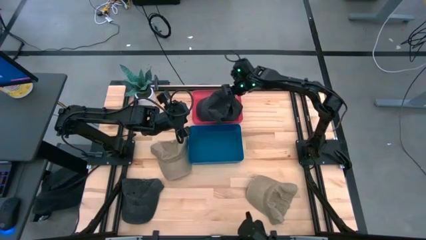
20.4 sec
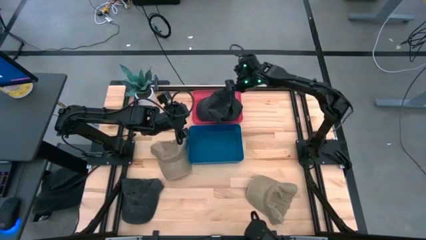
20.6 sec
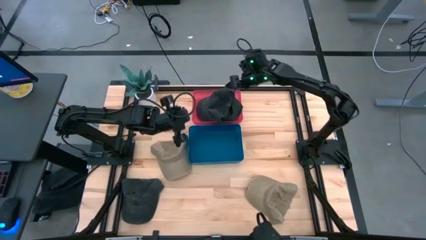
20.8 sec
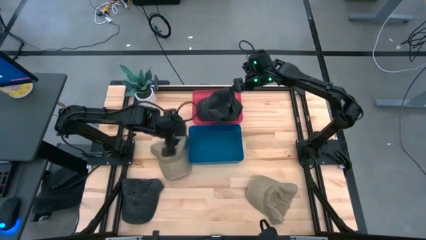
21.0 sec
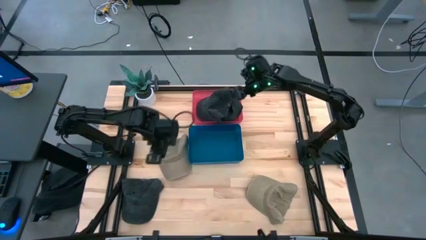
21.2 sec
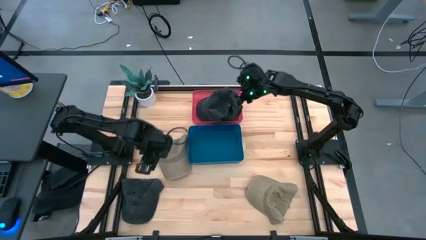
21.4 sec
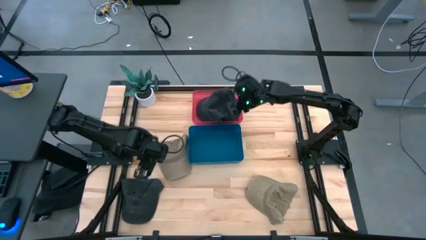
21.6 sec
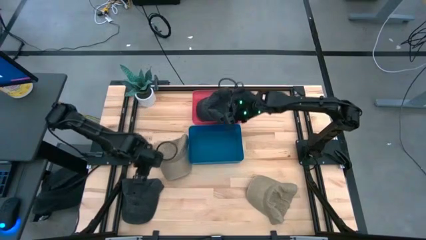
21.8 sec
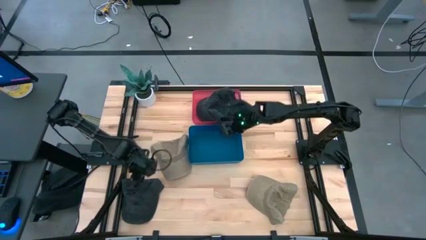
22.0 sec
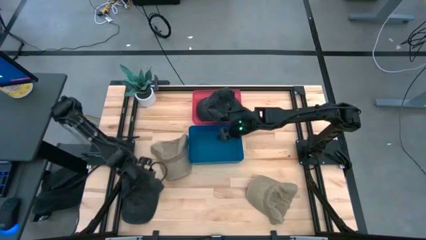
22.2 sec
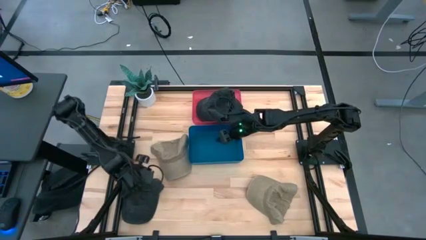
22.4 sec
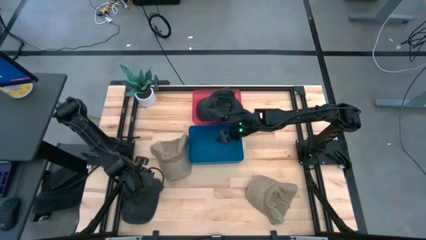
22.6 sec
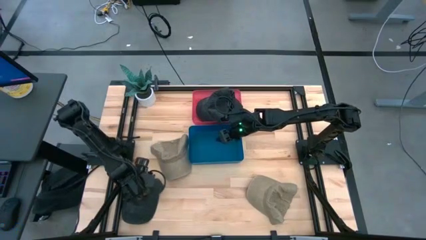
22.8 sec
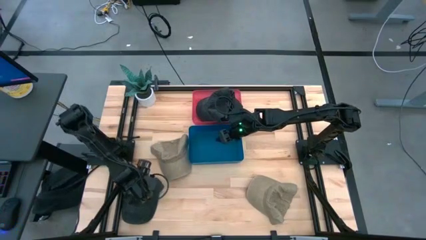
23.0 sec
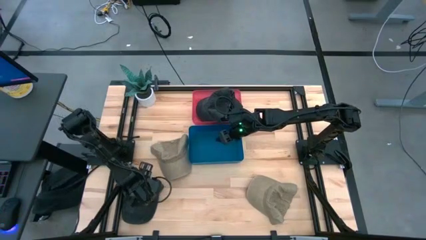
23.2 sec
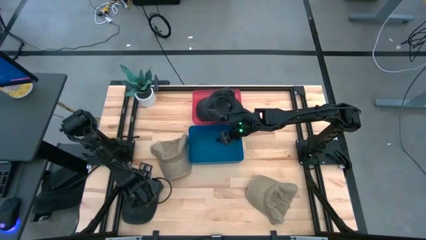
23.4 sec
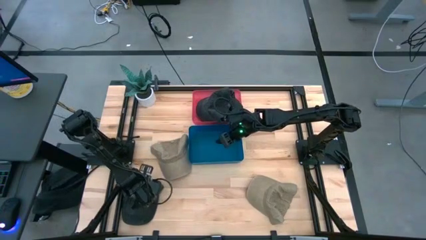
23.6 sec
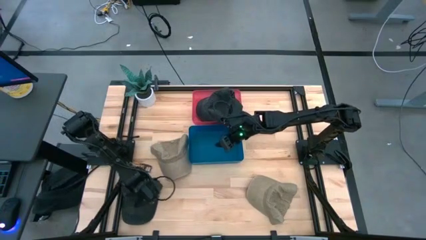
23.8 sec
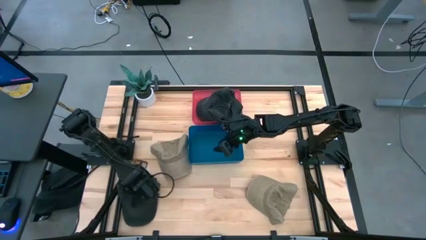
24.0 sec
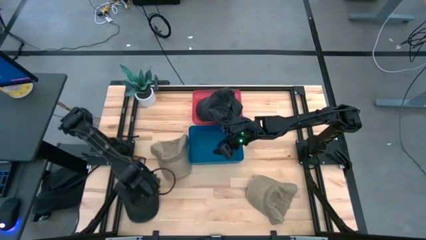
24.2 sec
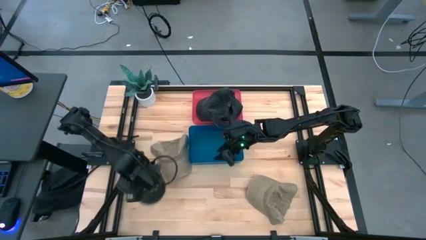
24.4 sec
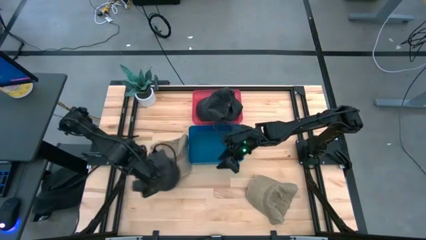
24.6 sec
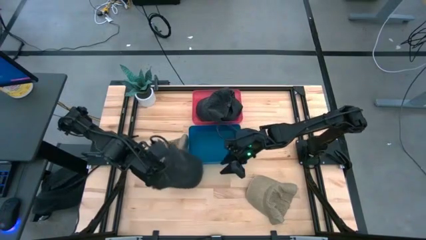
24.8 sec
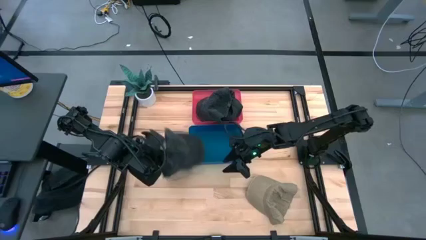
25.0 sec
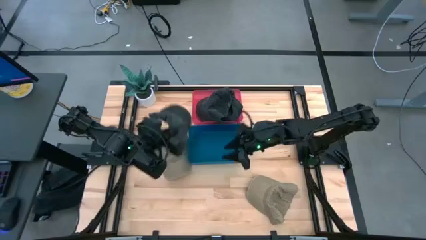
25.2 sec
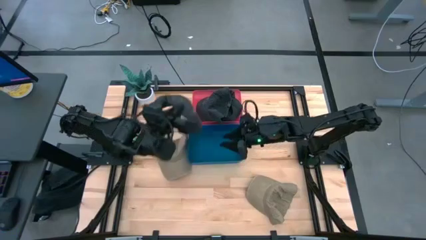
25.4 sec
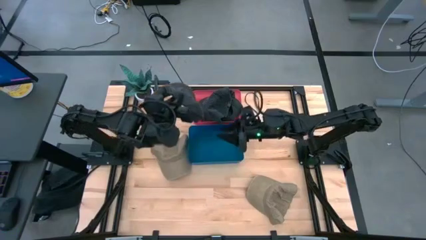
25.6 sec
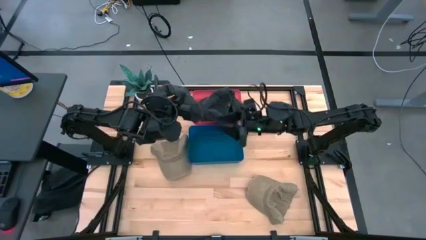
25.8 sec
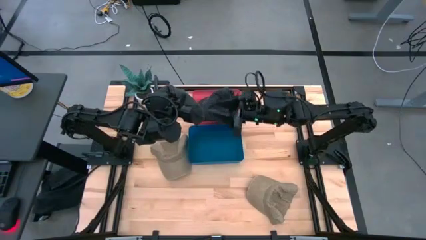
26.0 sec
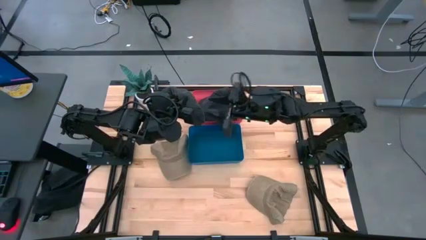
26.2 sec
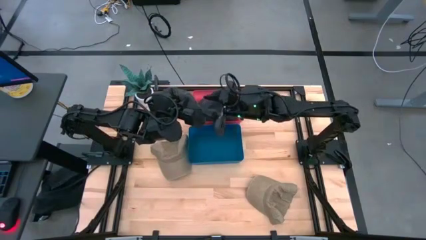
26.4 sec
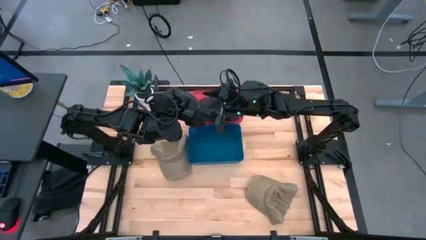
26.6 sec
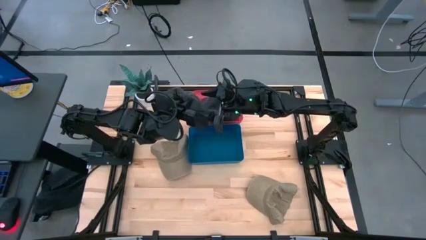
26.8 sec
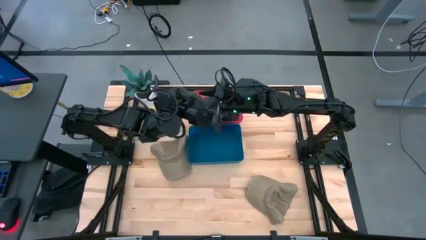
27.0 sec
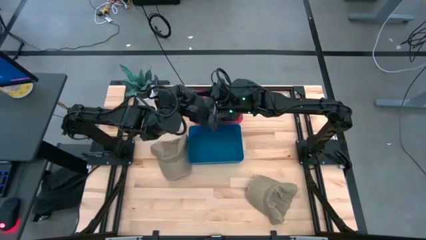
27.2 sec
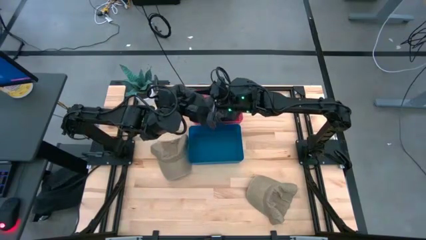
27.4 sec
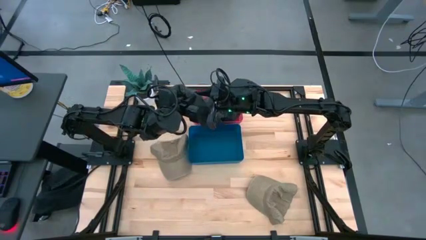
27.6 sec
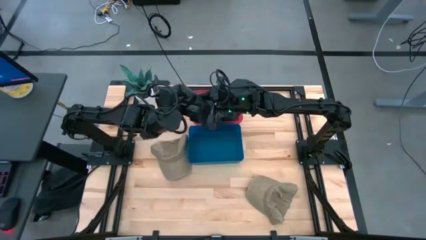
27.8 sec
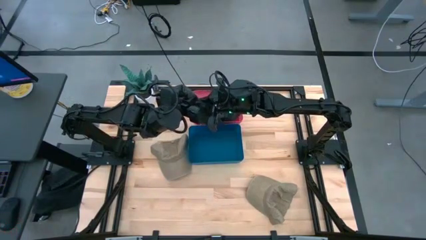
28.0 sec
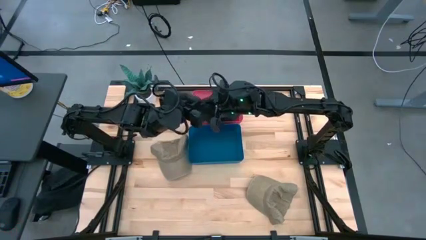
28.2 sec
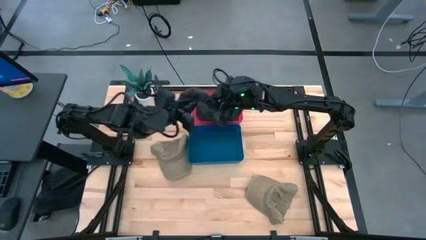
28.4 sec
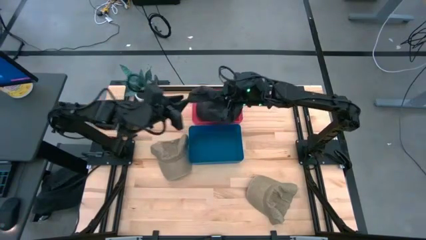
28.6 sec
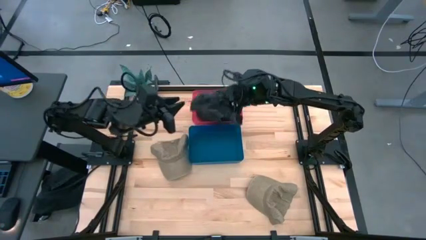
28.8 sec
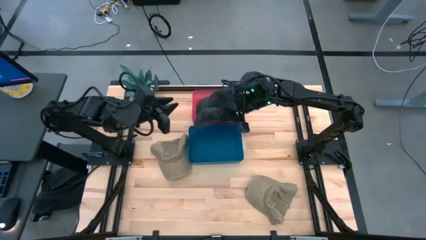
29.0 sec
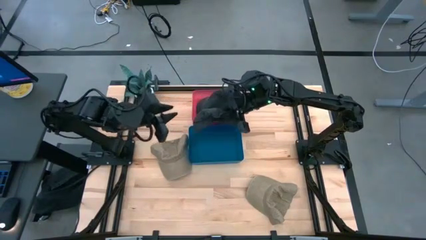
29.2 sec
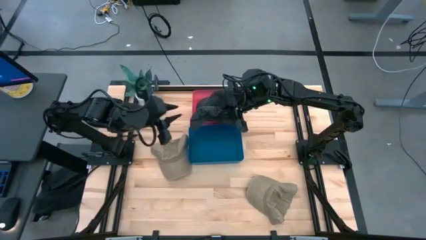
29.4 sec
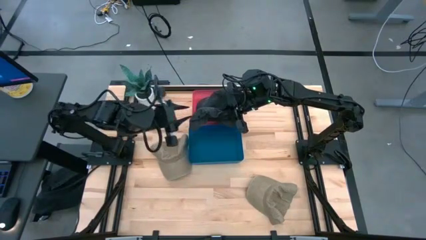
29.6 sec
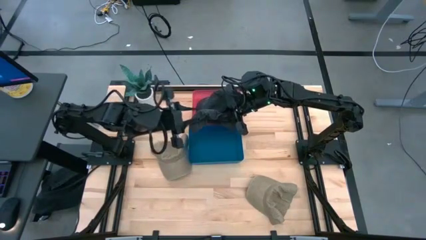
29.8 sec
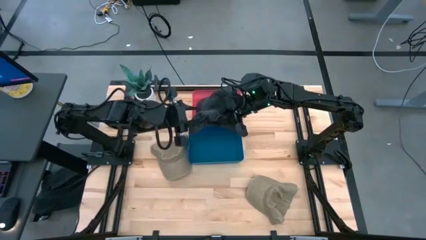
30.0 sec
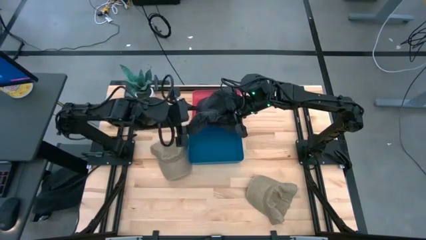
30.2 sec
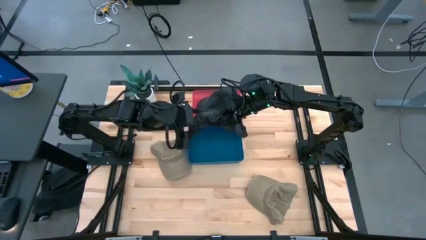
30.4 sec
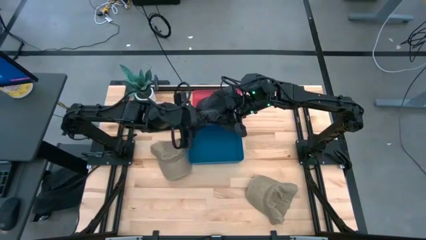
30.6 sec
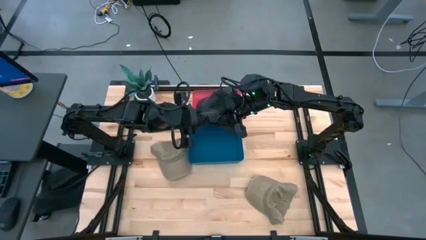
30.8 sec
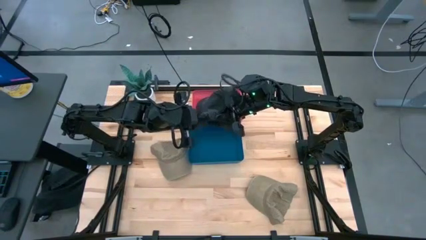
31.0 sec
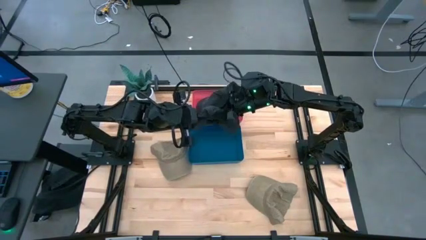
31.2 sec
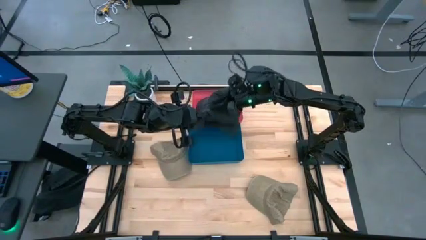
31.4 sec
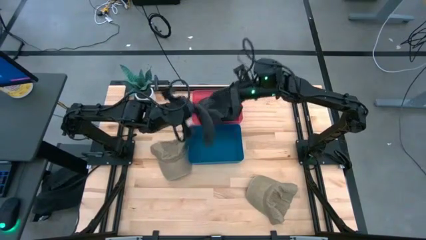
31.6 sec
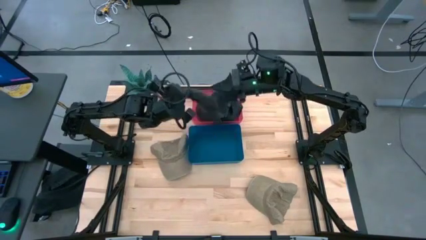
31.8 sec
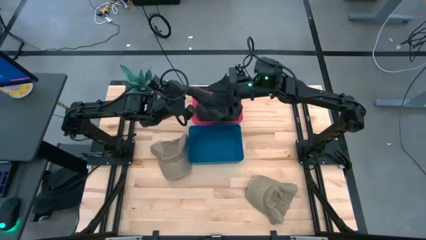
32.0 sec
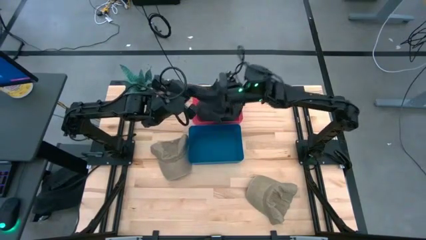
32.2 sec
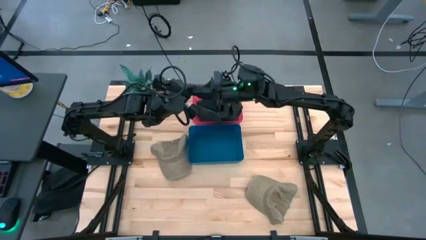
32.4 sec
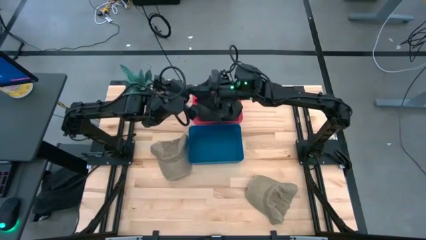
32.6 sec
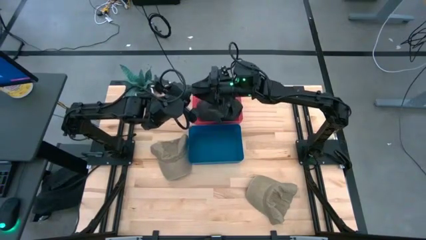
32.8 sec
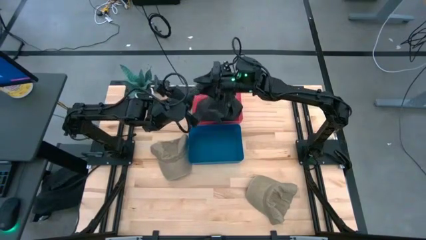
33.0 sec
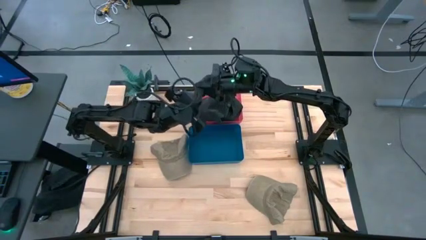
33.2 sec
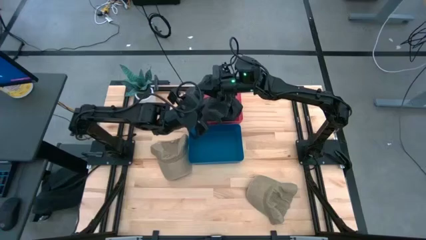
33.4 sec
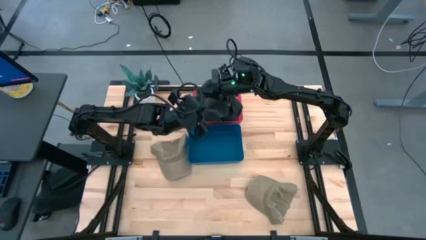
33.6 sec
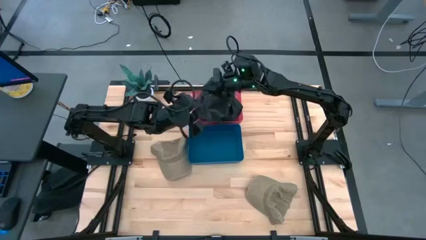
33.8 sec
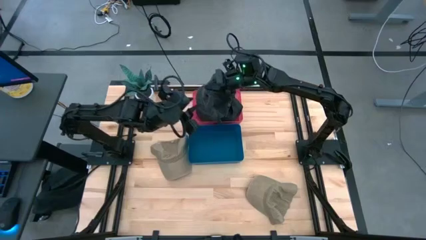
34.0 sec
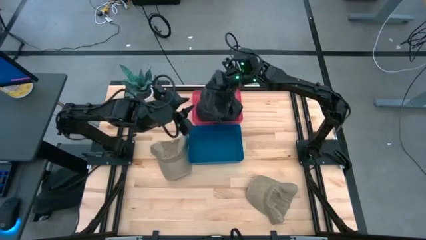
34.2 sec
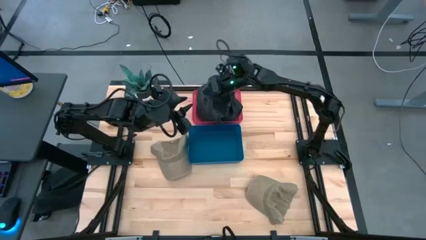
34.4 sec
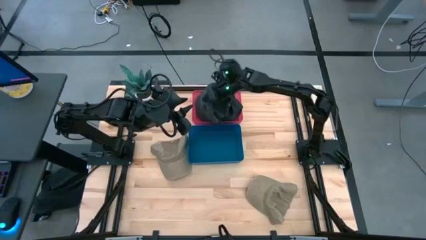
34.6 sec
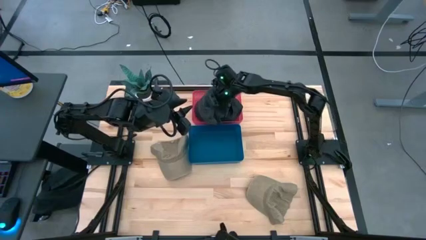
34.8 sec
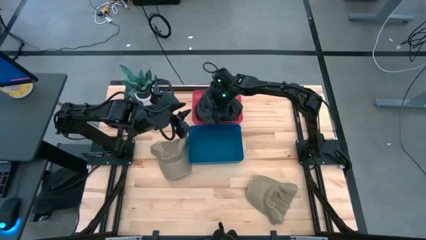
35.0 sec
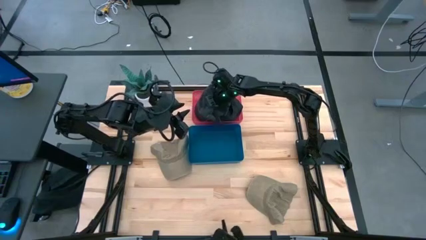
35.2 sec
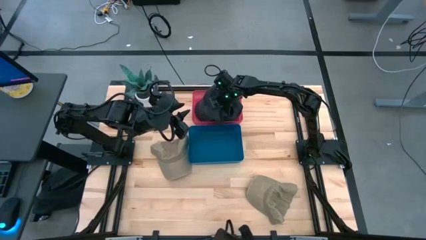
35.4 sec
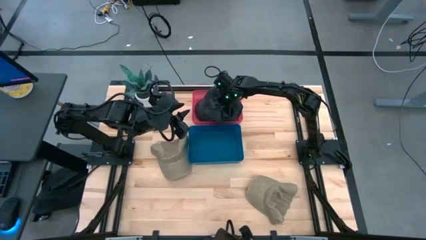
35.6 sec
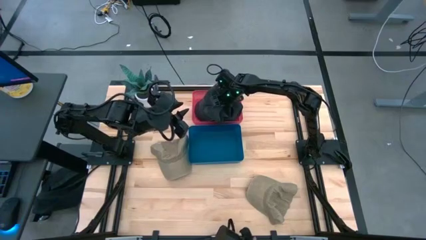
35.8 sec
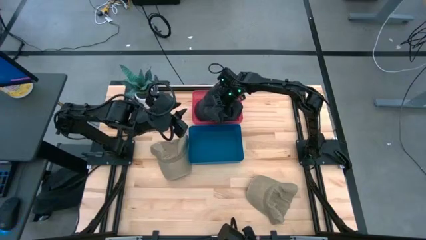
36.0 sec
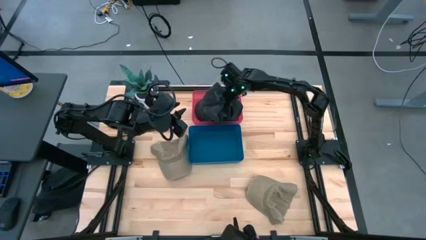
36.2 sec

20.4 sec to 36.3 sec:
Task: Pick & Place hat
Put the black cap into the red bin
